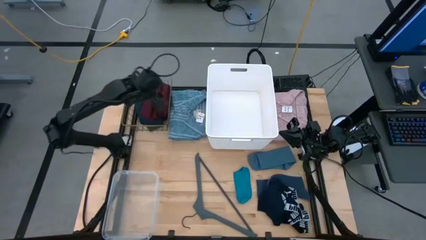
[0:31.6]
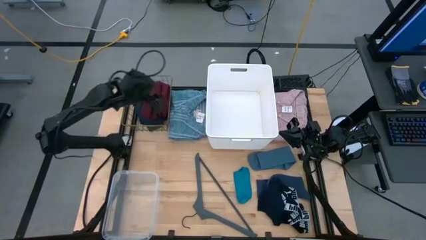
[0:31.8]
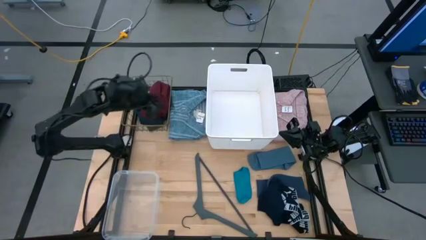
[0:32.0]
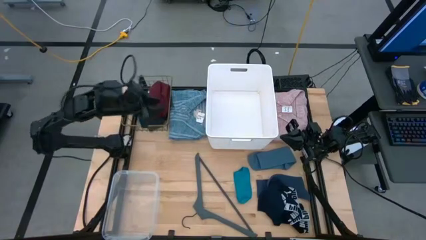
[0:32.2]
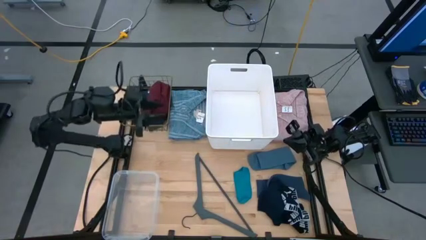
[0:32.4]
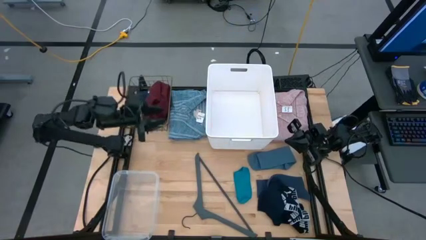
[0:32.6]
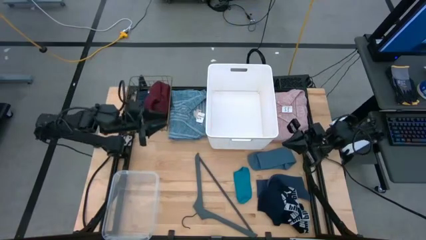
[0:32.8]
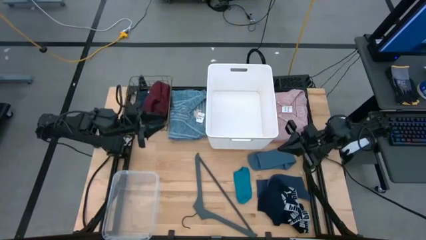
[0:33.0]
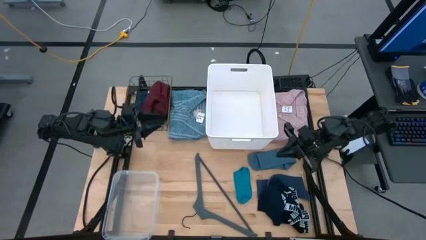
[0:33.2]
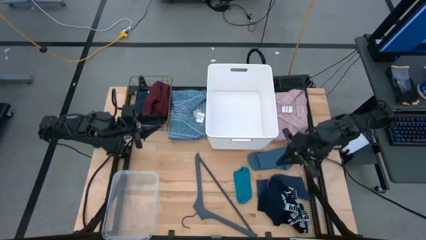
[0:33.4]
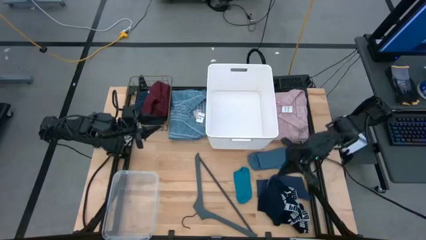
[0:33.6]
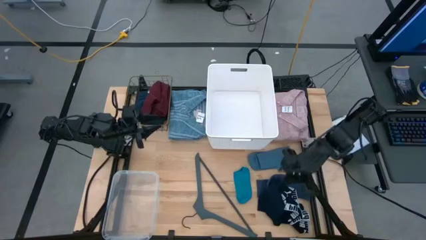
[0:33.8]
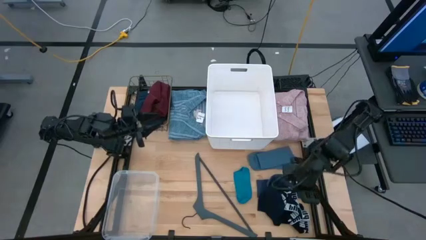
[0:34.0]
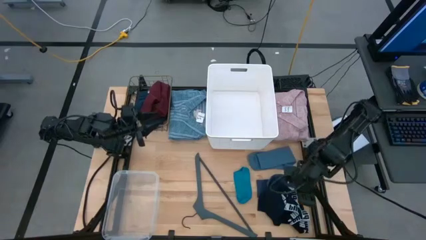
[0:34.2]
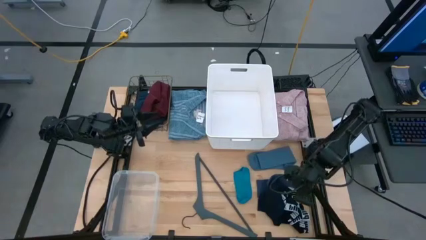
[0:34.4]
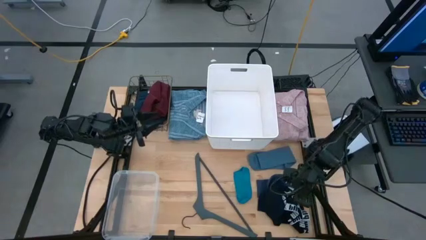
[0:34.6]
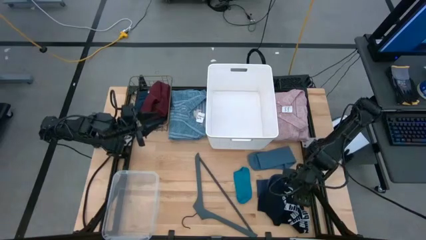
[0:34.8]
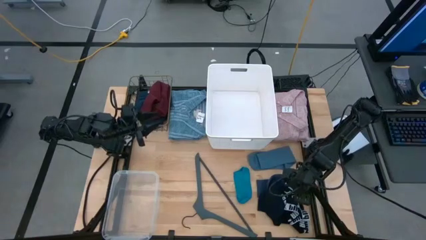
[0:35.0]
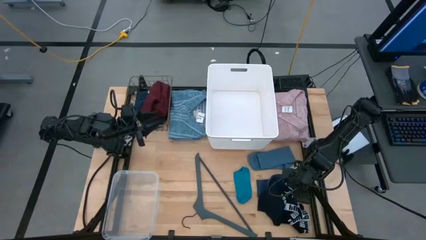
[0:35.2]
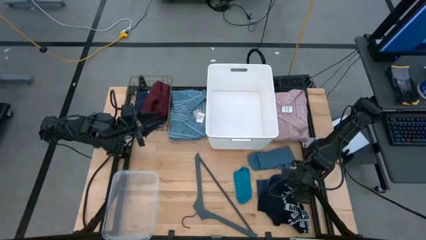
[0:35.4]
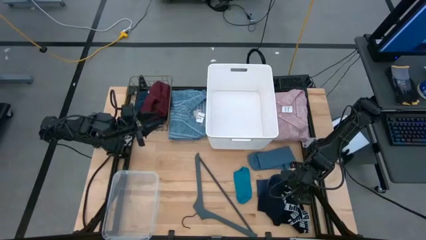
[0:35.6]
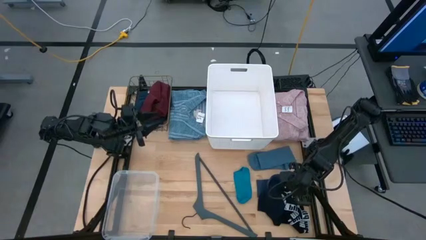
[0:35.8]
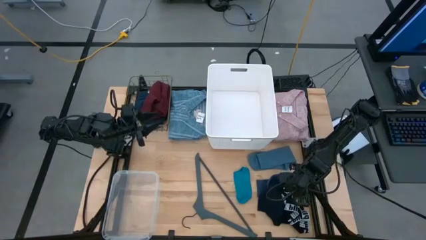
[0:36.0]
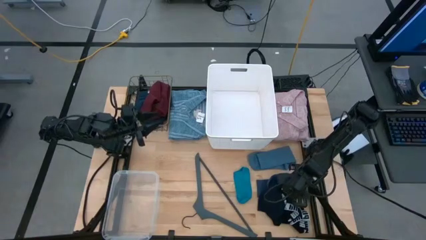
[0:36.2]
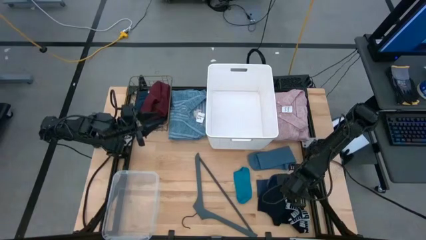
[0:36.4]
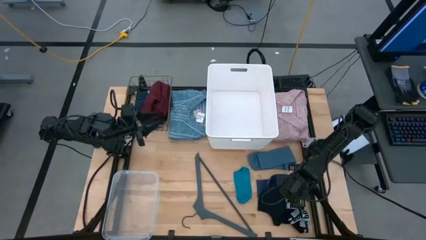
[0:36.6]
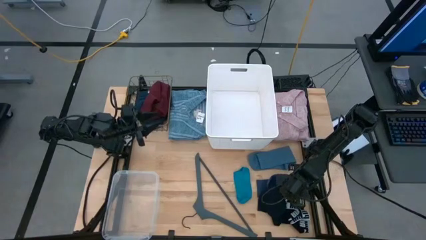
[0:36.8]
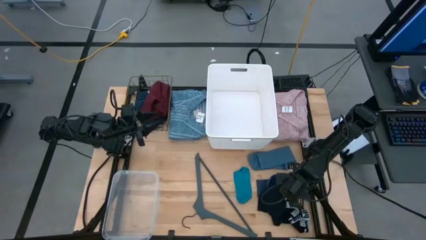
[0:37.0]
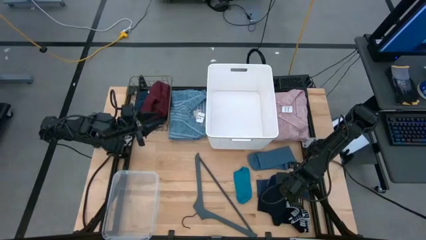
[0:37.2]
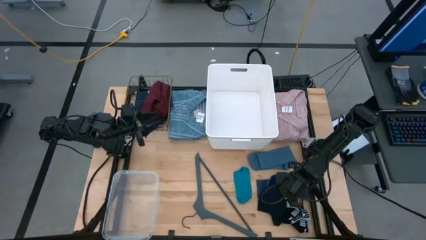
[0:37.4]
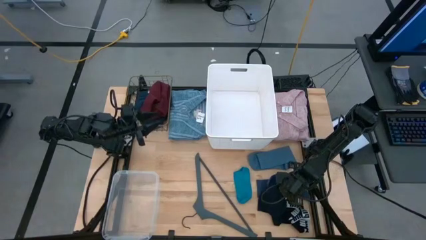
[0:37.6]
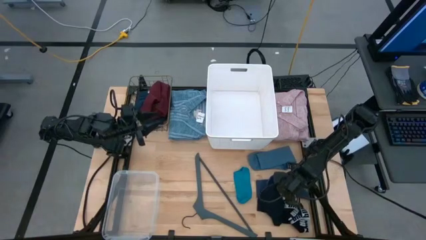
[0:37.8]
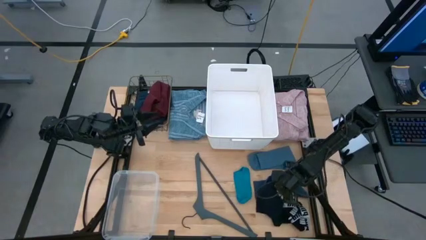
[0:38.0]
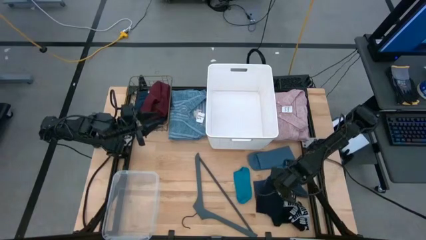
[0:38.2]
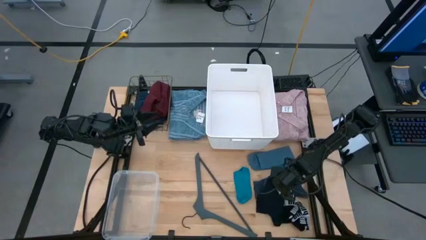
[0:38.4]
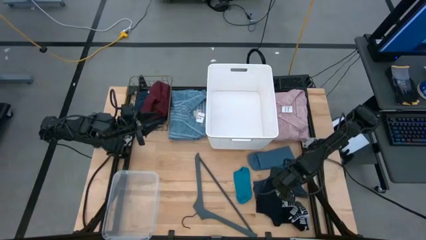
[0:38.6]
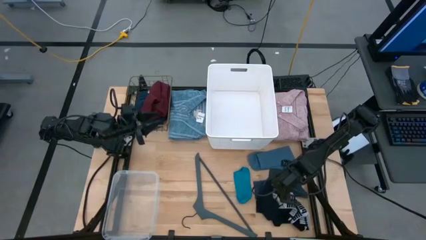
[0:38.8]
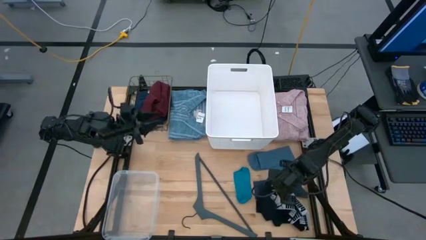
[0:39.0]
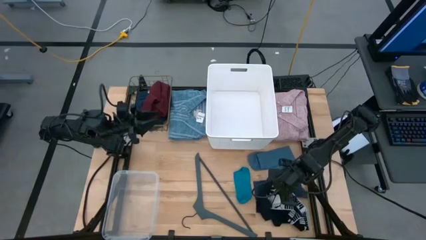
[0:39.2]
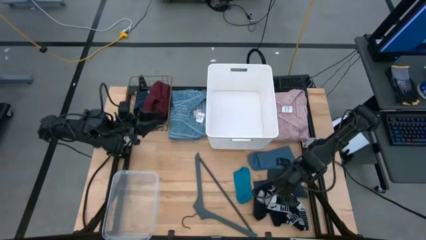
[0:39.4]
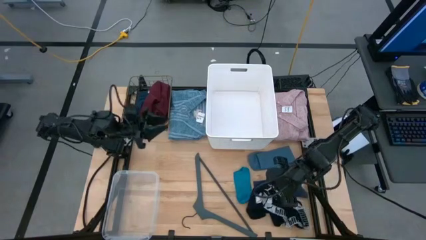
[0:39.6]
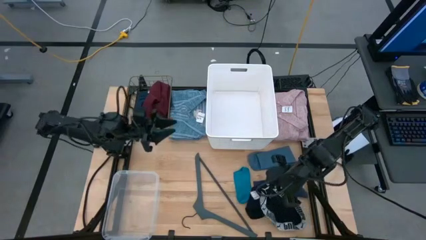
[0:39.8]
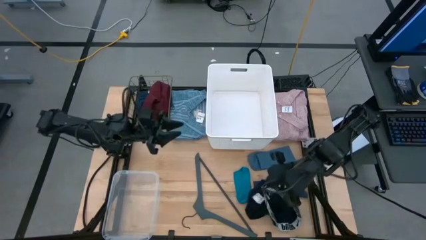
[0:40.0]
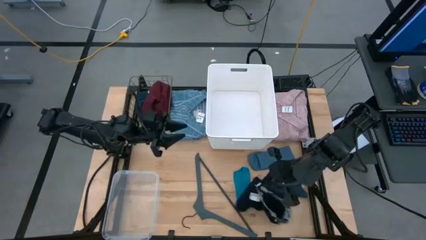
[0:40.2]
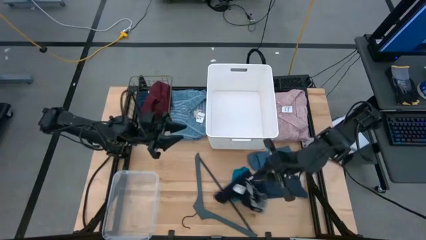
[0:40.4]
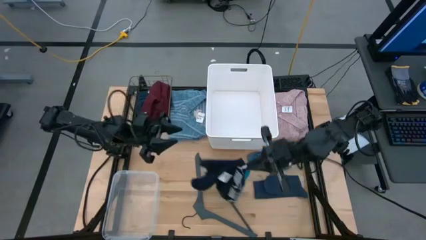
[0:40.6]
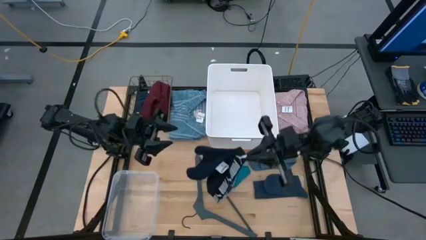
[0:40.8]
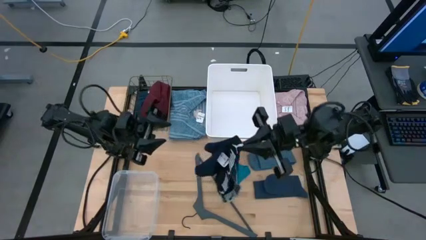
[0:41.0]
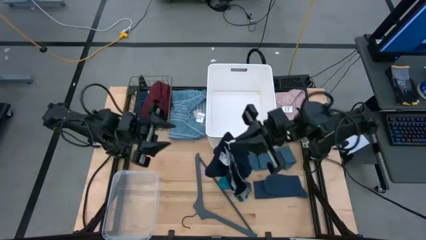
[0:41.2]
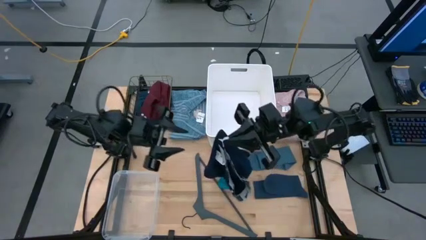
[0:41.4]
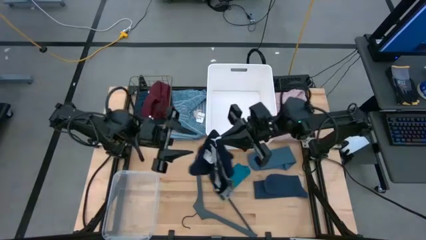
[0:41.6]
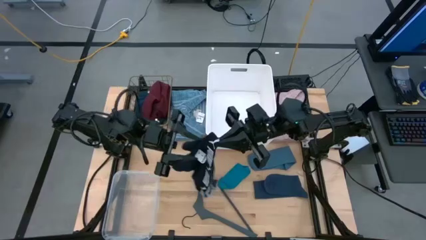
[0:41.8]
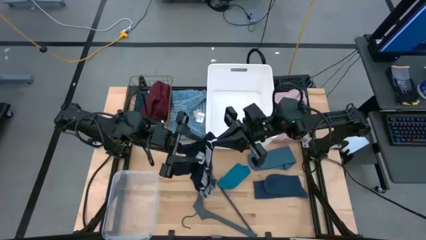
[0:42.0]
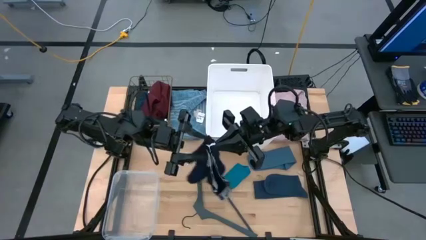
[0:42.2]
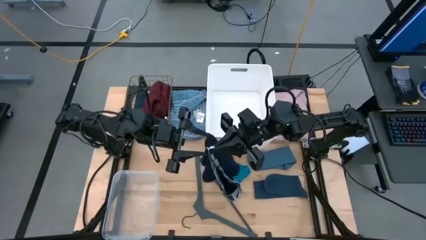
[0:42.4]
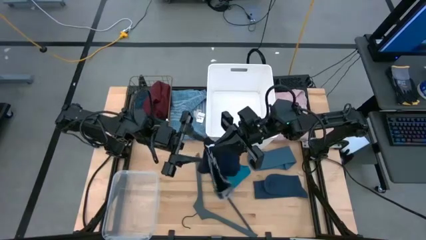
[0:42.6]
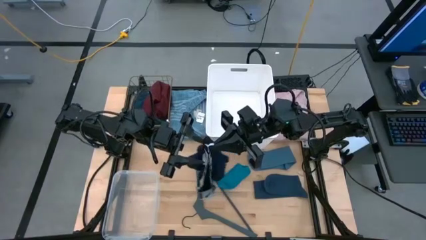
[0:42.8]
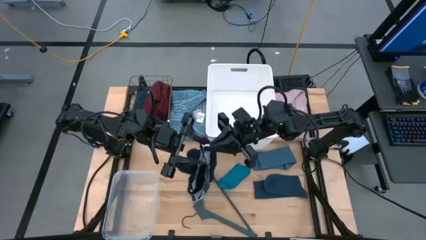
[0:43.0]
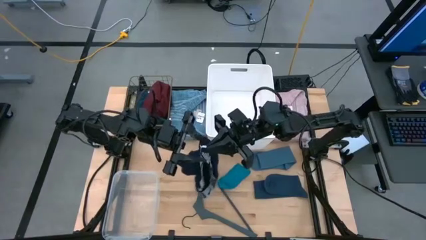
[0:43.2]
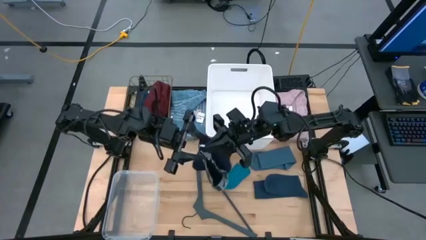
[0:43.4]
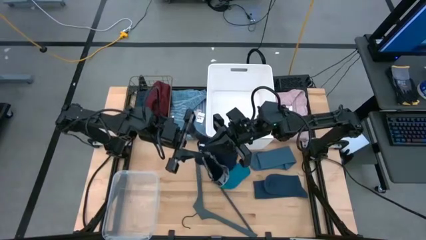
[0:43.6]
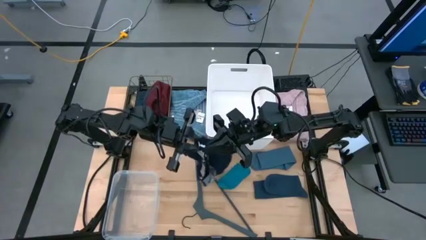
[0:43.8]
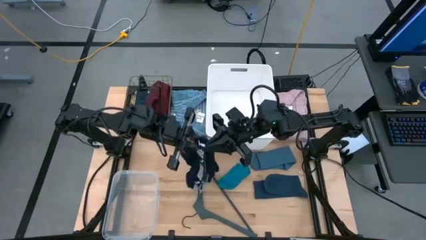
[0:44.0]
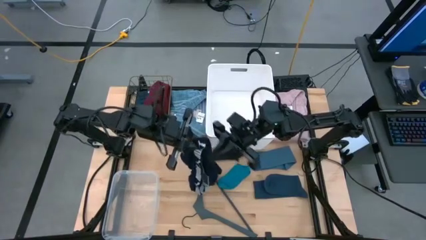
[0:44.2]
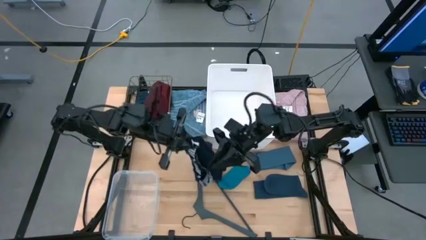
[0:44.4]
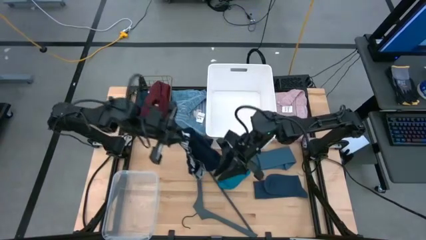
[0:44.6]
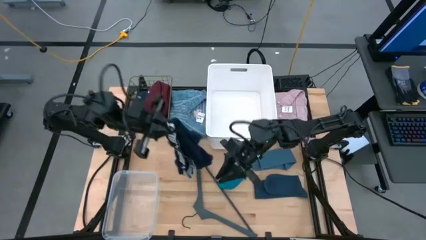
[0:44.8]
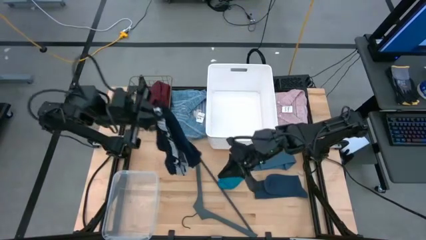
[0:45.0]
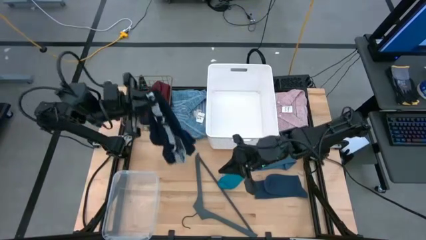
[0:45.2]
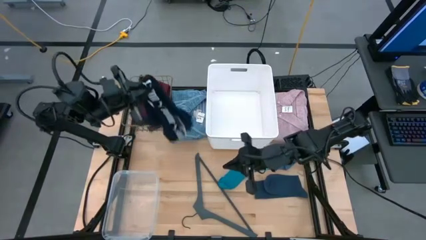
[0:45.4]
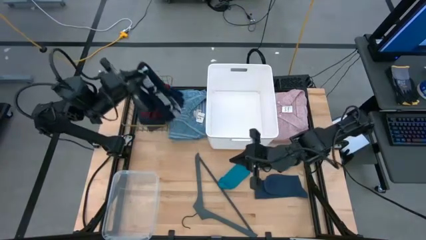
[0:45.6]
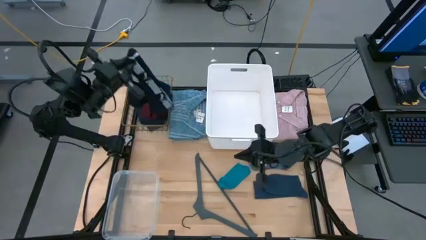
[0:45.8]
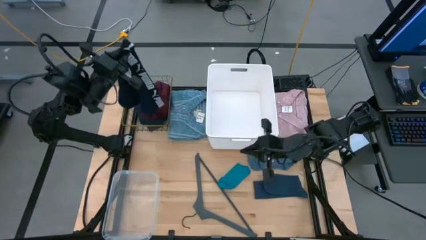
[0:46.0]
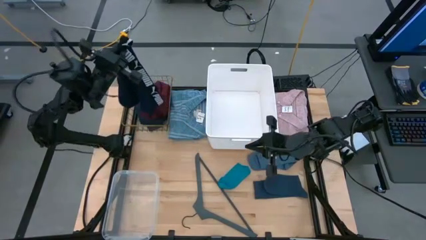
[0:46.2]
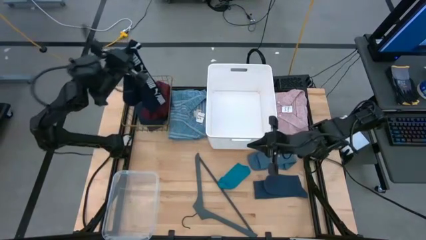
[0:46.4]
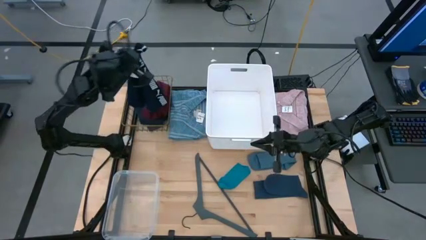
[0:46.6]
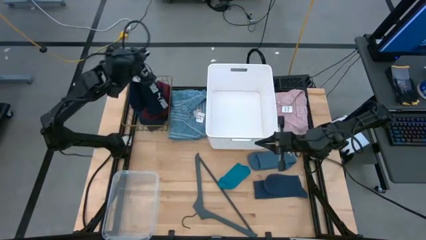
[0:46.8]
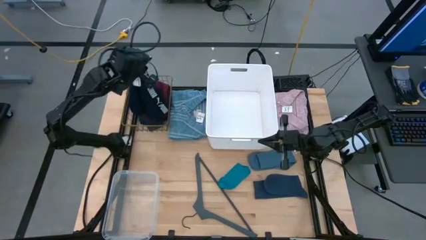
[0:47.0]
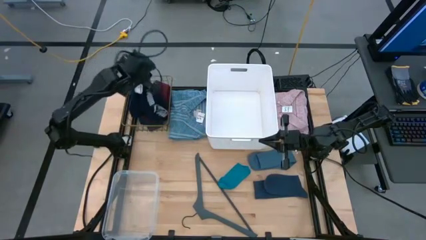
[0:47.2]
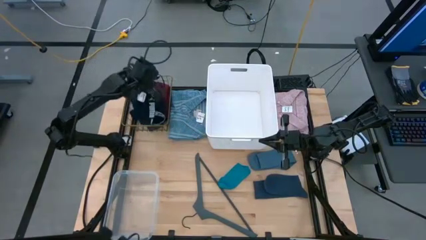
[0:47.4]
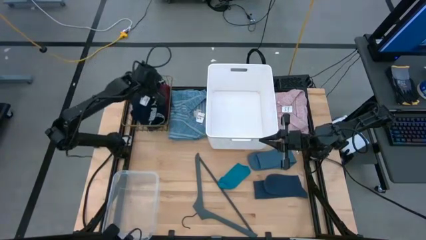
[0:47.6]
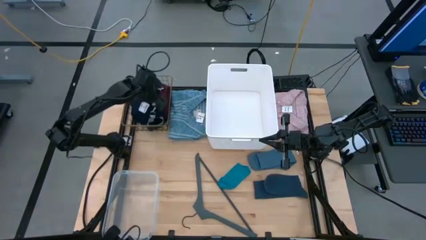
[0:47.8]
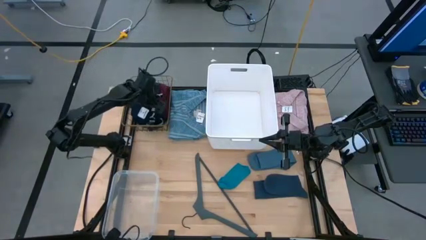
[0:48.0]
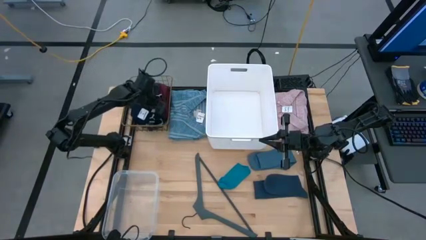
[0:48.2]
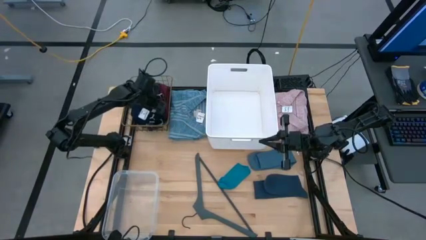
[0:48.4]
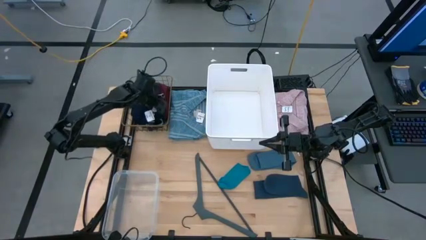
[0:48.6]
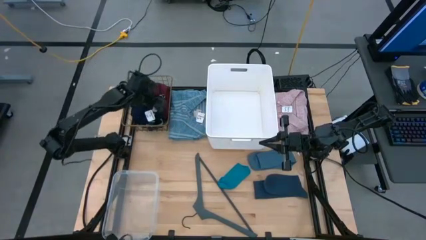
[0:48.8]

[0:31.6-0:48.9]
Task: Pick & Place Cloths
Put the dark blue underpants into the wire basket
